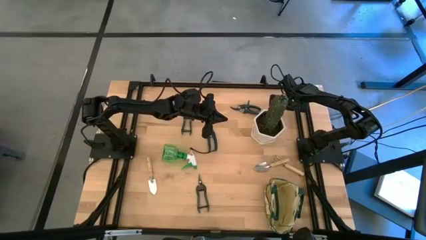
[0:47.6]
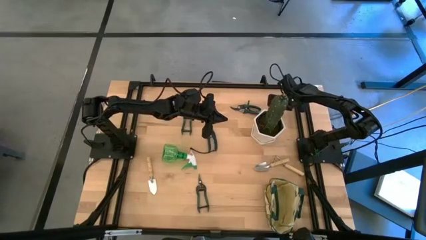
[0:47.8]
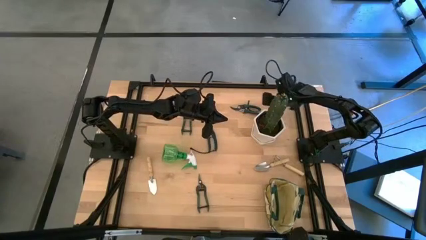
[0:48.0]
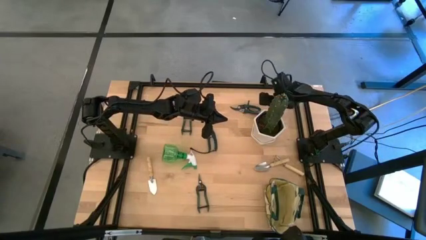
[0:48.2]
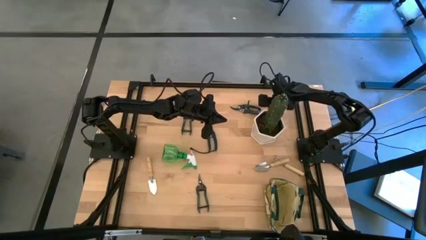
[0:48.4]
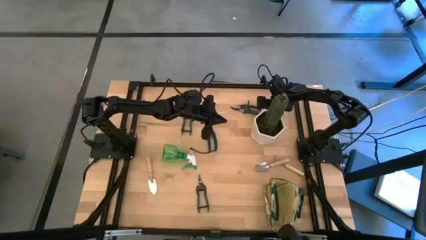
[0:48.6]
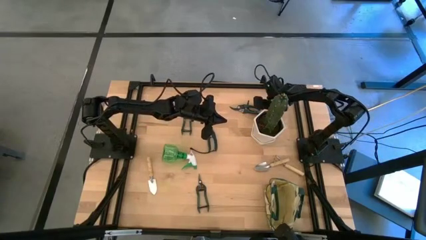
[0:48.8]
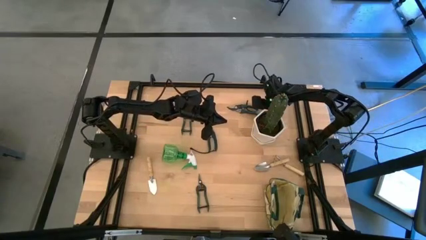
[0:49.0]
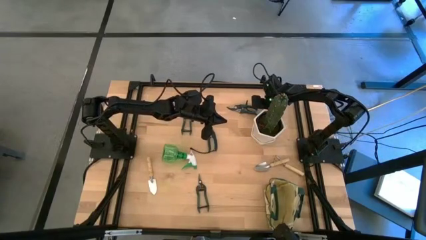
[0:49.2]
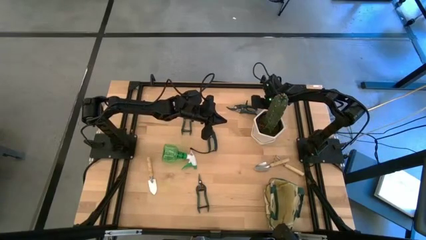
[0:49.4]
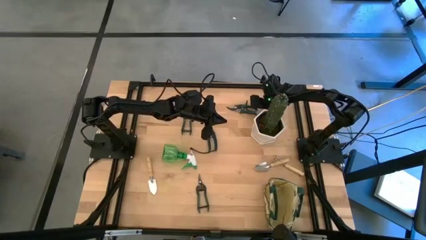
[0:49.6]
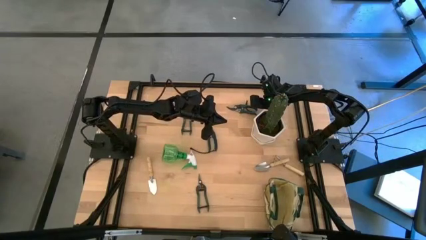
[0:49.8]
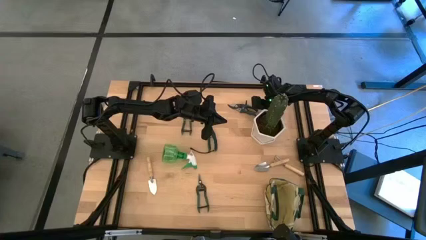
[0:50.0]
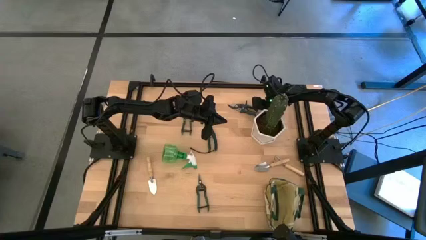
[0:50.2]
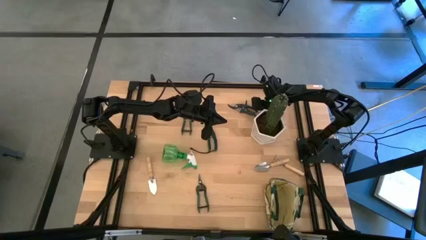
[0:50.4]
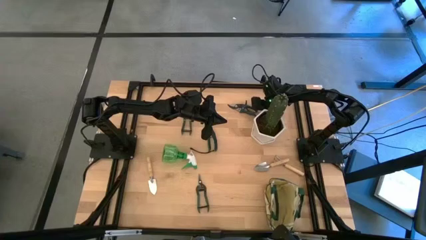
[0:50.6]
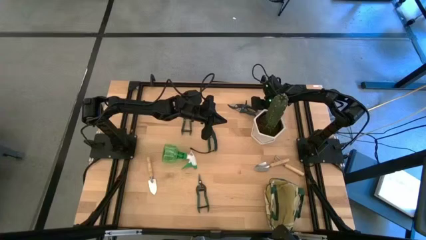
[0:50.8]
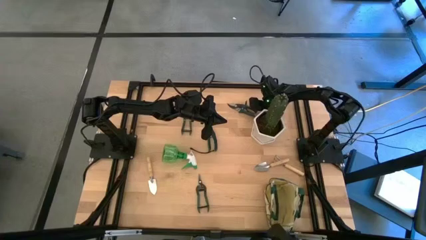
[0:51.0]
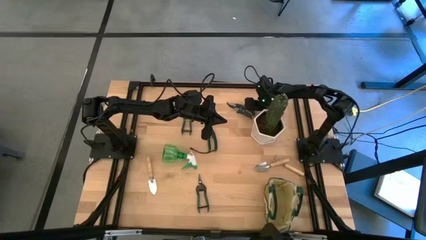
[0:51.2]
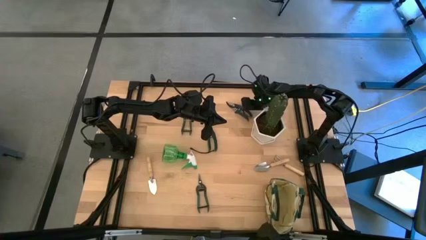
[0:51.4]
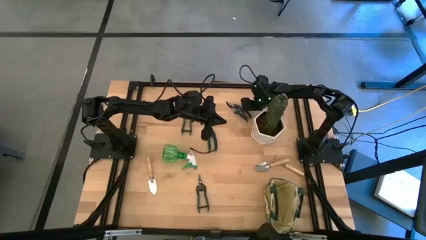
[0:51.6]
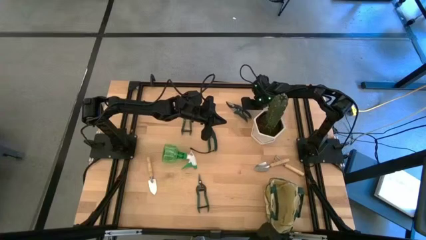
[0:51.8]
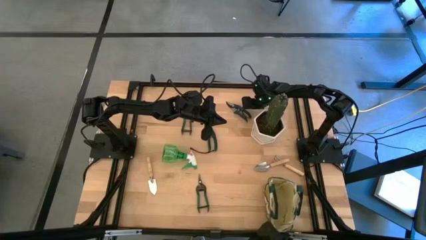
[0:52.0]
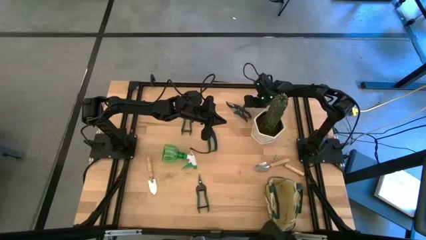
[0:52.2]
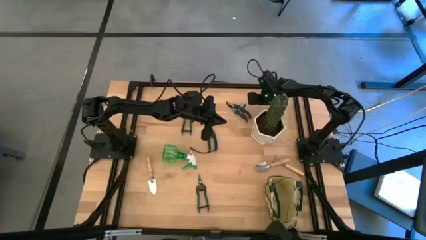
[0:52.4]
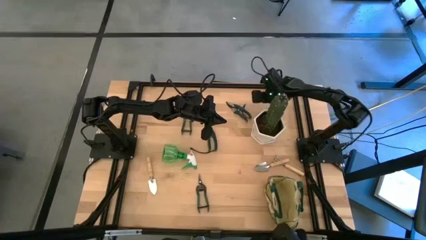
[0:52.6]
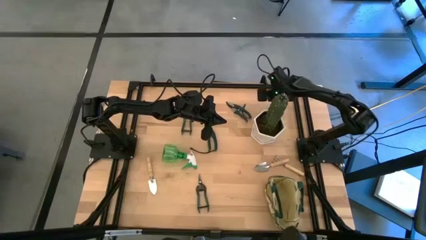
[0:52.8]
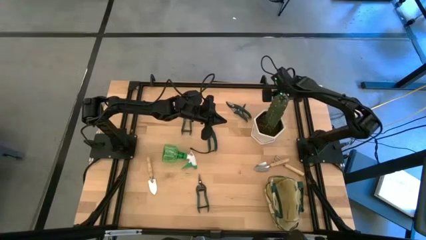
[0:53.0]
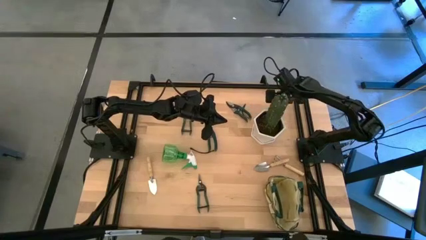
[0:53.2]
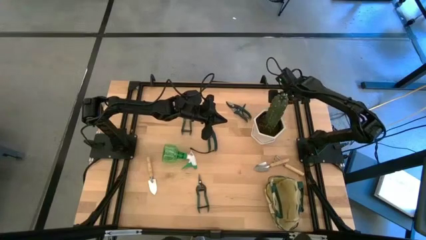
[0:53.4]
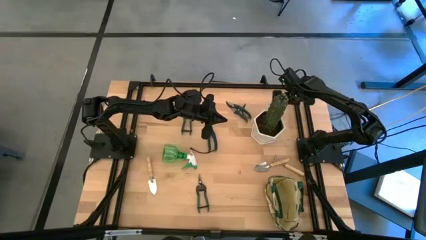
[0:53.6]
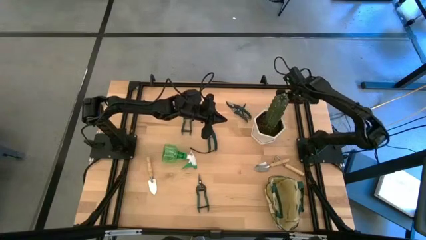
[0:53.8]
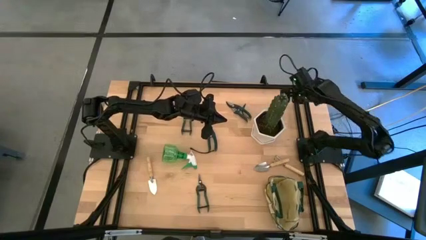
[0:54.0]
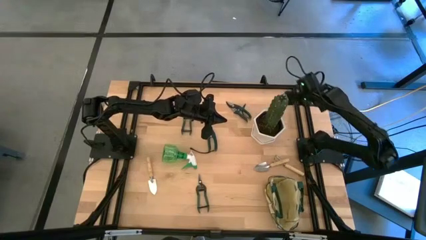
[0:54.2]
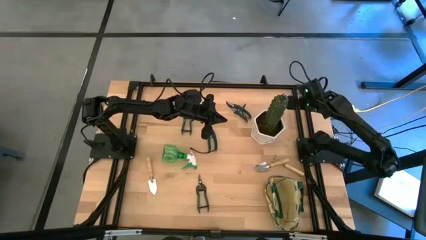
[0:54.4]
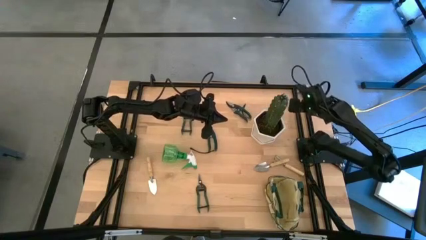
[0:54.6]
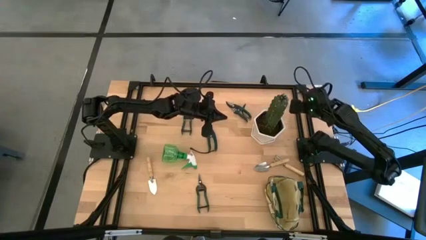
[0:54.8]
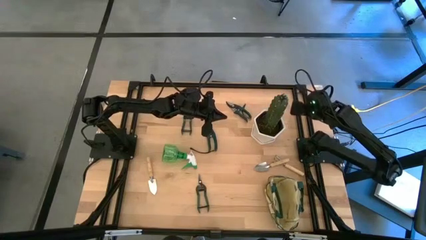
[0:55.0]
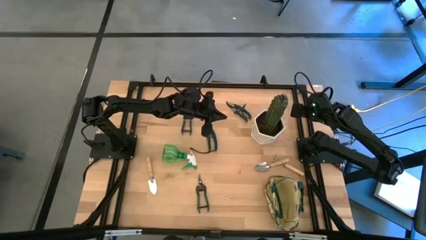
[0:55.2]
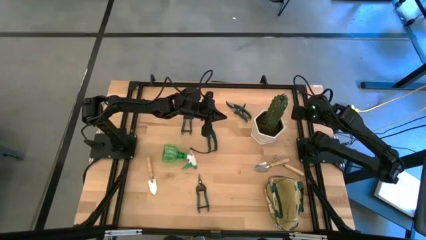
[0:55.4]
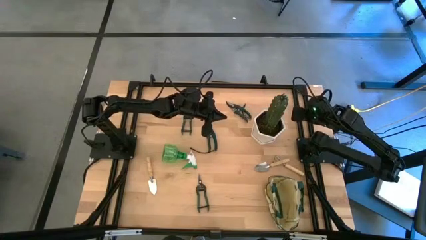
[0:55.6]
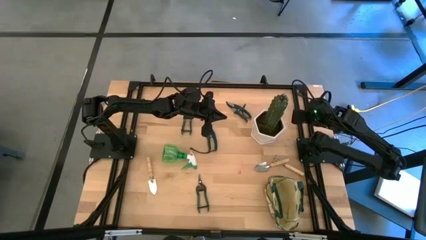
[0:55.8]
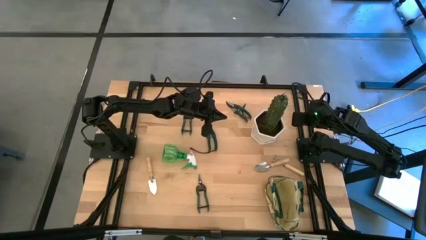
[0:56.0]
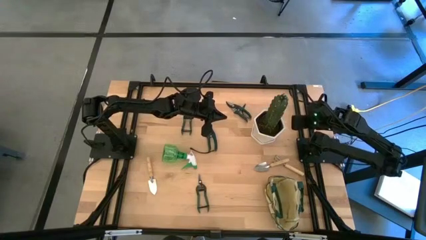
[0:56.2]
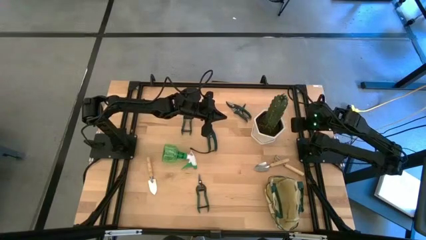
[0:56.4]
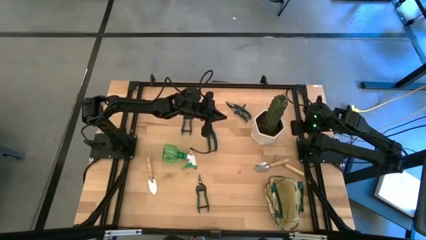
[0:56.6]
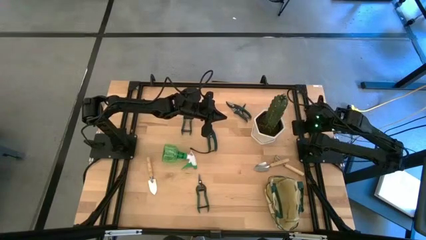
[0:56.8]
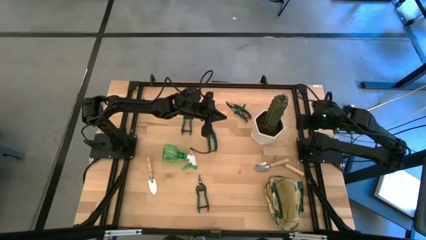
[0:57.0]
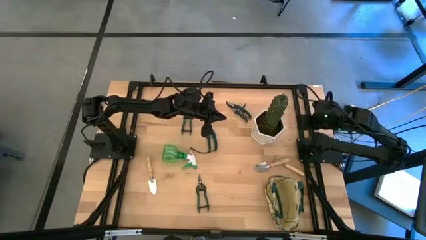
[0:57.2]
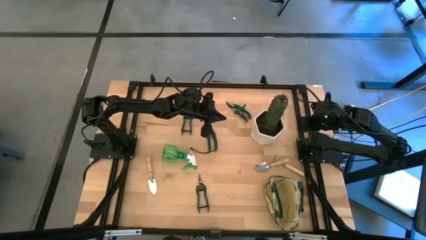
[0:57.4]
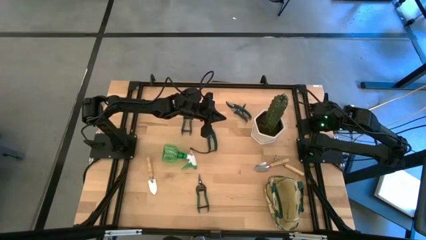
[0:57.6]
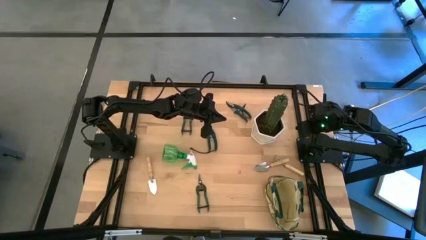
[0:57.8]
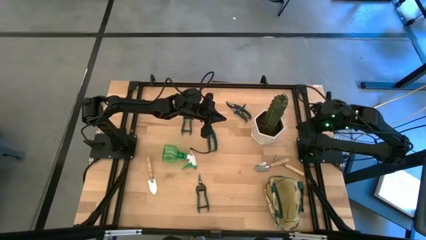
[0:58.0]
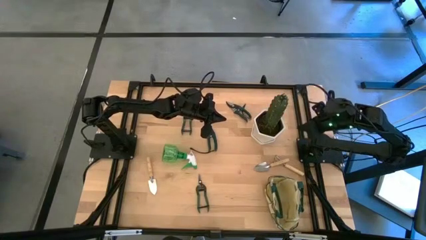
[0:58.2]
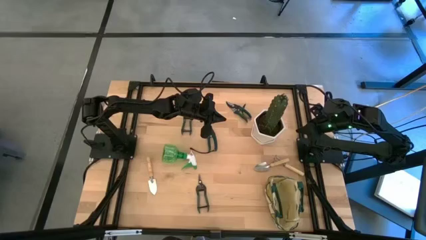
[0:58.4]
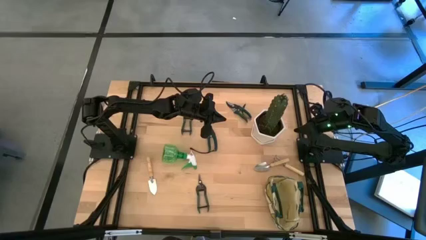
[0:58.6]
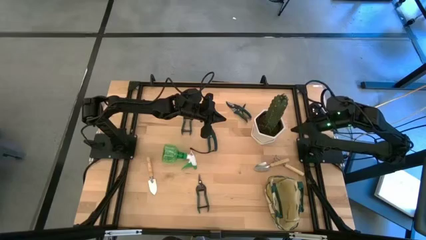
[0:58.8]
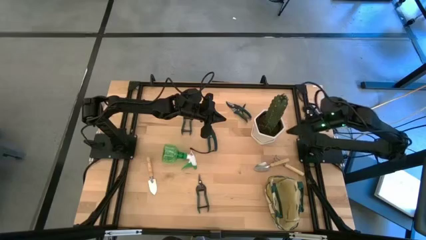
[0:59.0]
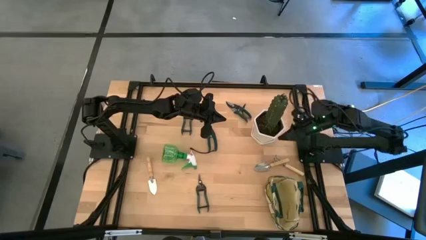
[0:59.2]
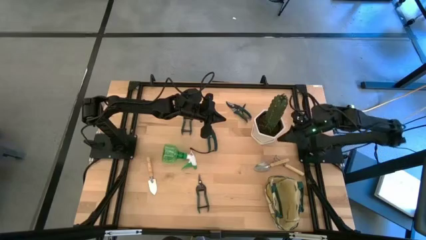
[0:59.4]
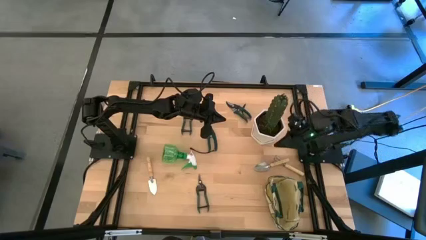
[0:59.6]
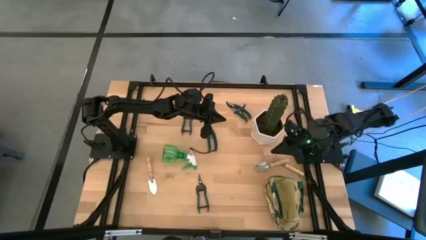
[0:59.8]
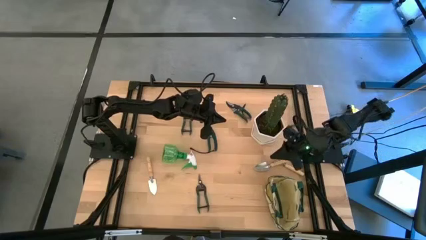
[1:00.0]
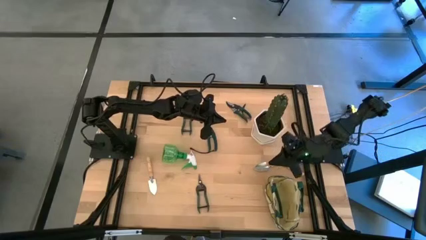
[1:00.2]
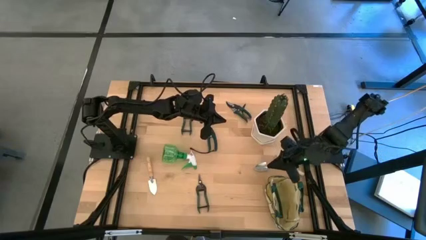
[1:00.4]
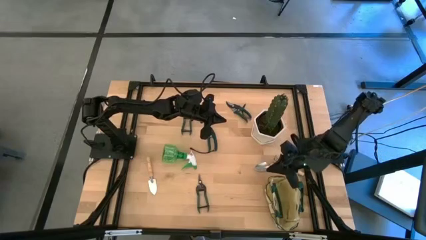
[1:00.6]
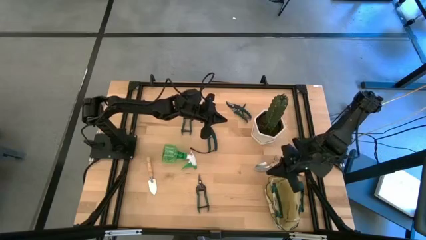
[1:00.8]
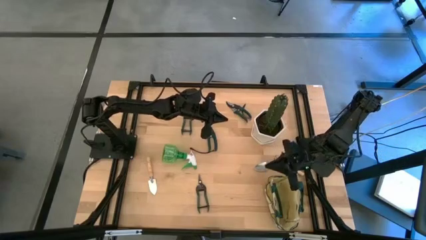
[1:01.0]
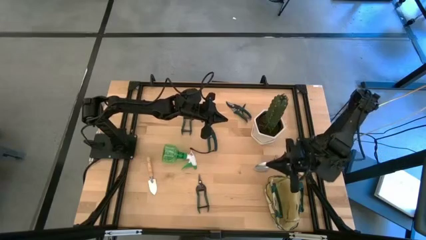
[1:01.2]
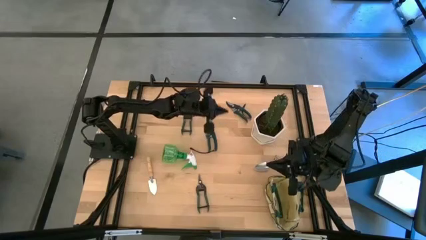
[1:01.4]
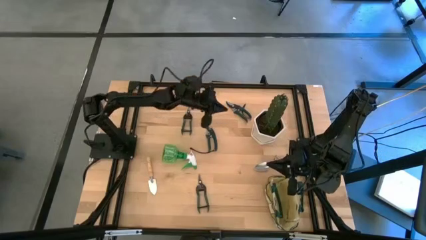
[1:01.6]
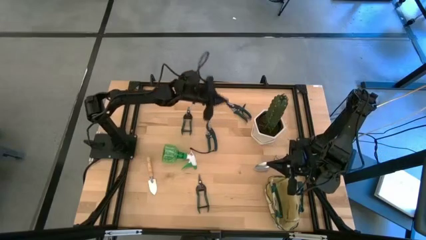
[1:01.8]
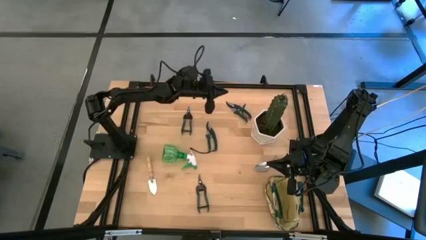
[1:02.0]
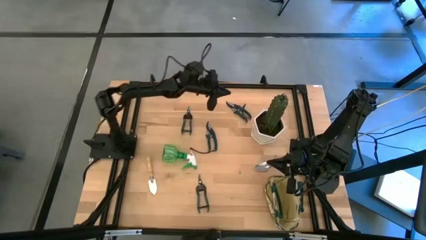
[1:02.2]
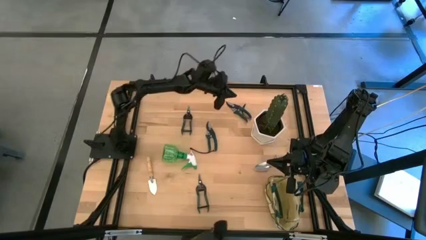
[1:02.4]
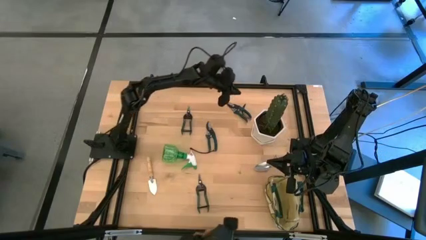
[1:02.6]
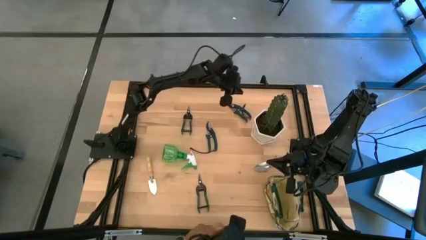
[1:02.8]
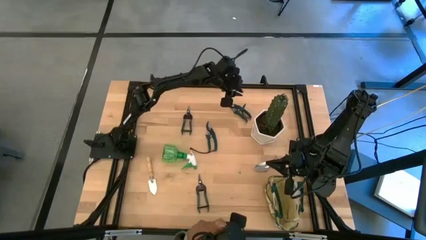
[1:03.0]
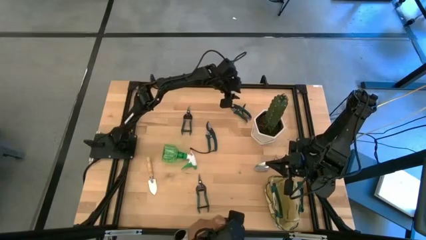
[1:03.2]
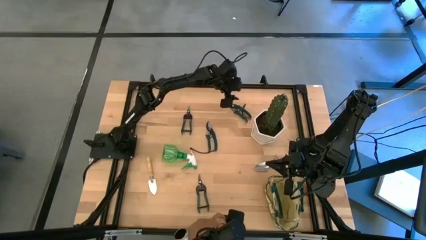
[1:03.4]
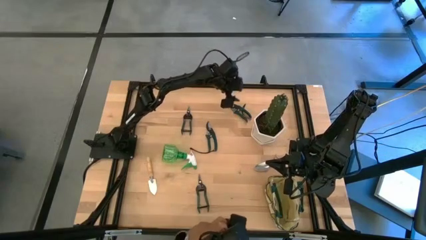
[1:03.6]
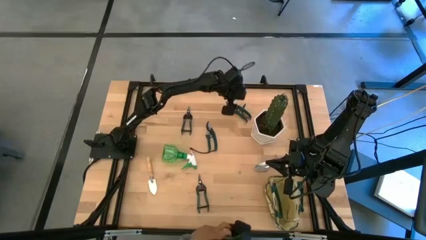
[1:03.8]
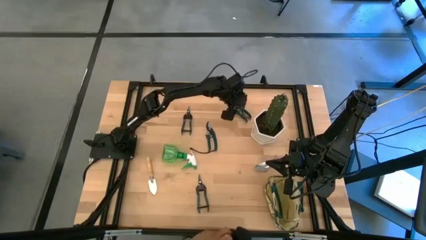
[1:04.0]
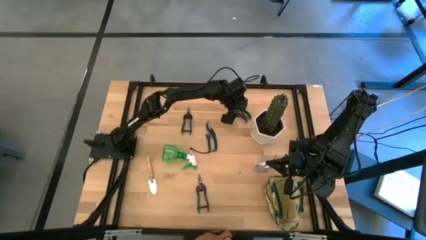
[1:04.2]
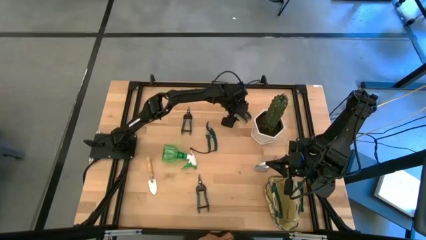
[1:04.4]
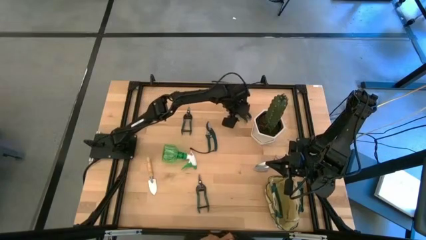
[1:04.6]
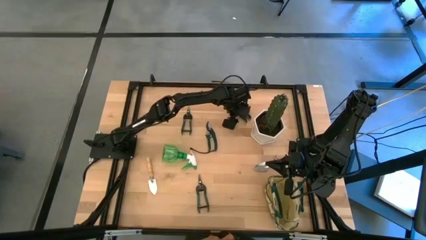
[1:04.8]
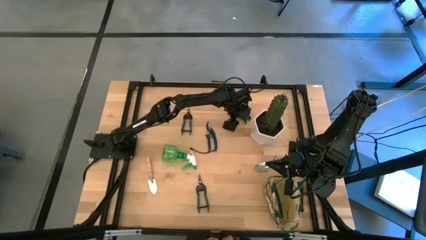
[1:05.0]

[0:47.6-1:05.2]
Task: Pick & Place Garden tools in Gardening bag
Put the top right hand pruner into the white bag
